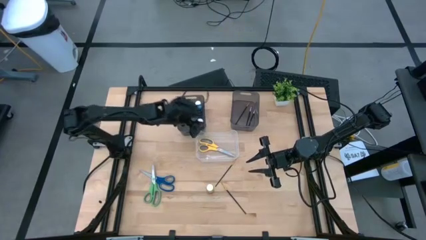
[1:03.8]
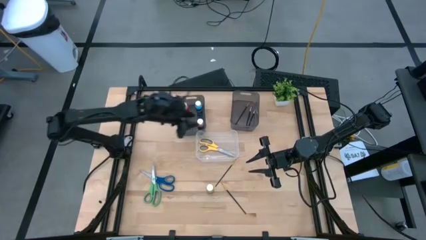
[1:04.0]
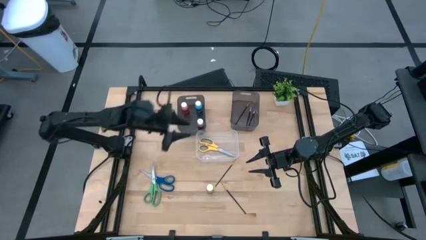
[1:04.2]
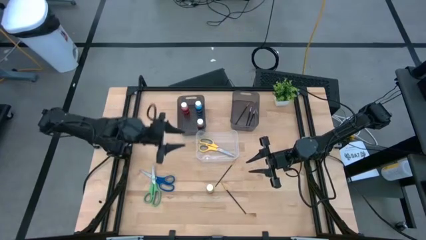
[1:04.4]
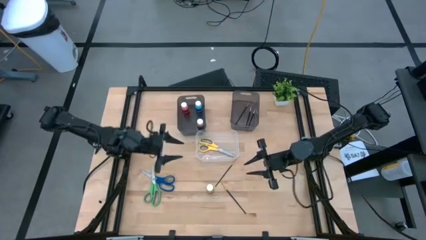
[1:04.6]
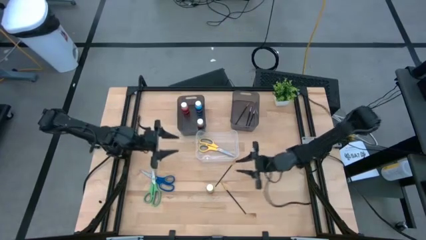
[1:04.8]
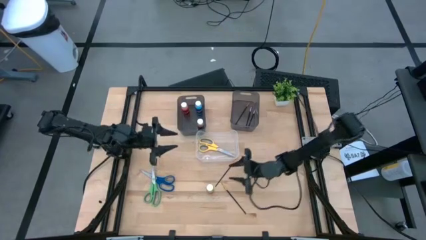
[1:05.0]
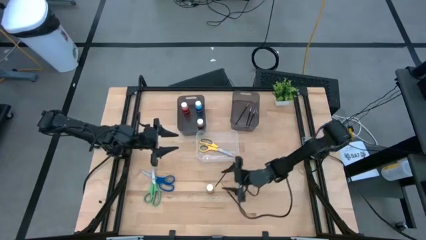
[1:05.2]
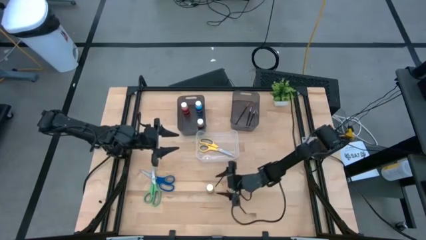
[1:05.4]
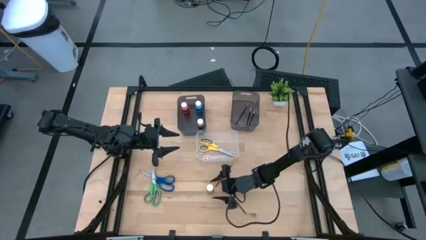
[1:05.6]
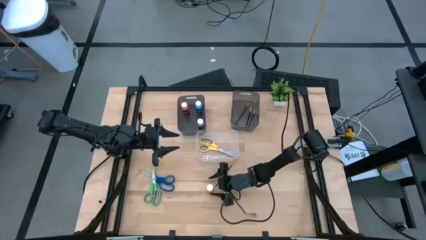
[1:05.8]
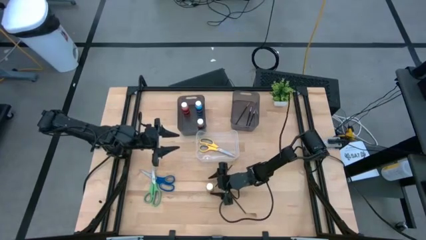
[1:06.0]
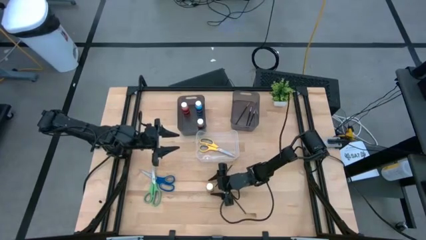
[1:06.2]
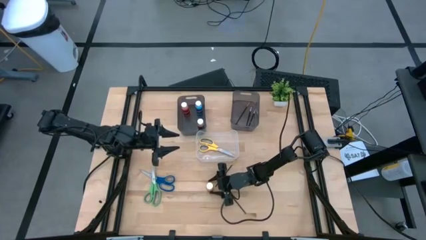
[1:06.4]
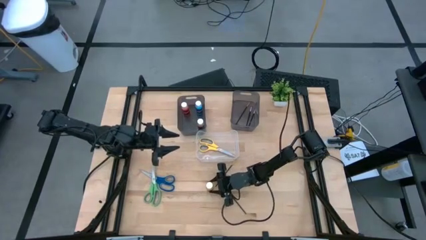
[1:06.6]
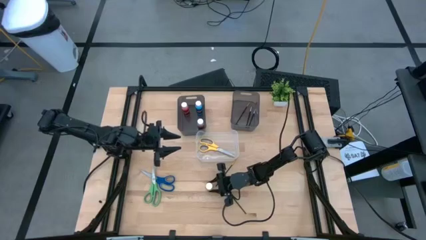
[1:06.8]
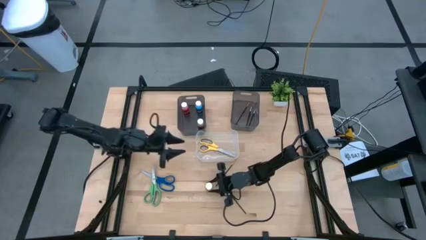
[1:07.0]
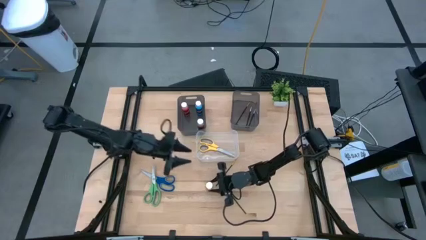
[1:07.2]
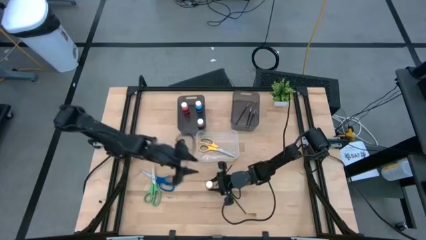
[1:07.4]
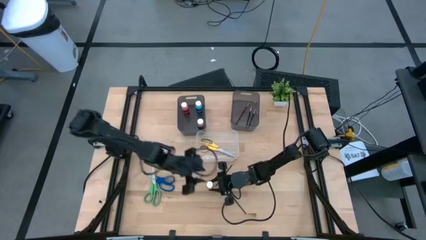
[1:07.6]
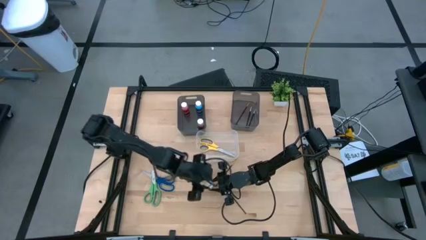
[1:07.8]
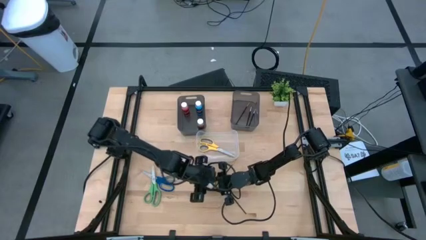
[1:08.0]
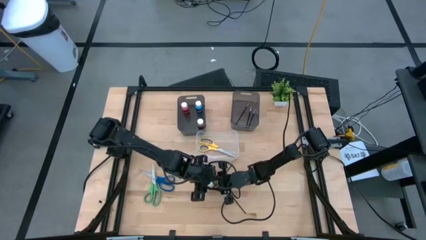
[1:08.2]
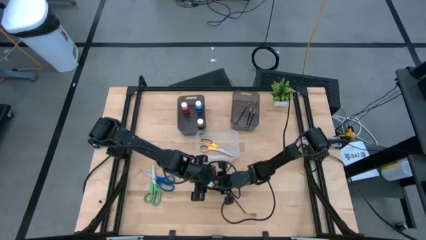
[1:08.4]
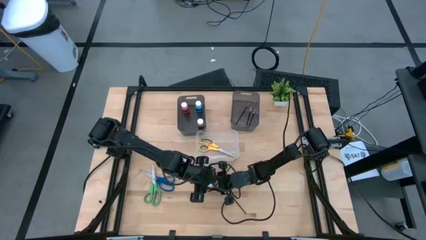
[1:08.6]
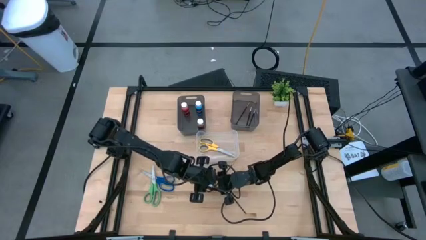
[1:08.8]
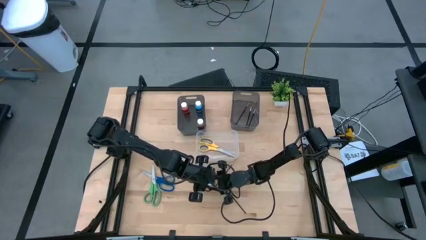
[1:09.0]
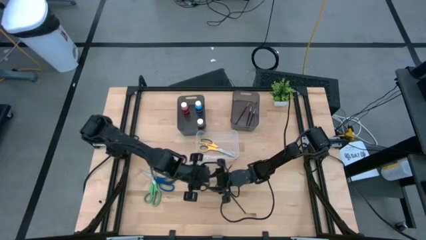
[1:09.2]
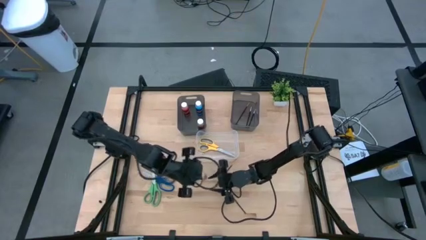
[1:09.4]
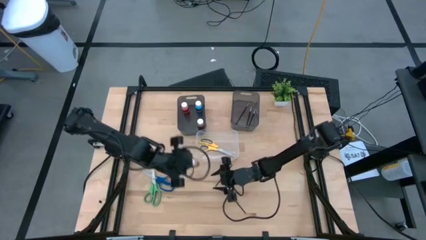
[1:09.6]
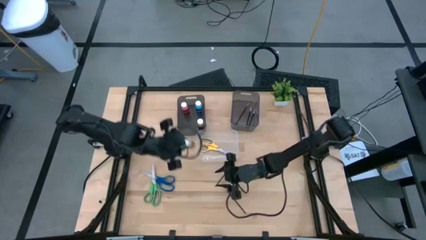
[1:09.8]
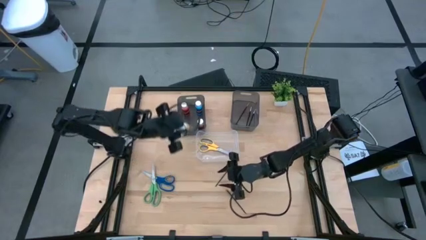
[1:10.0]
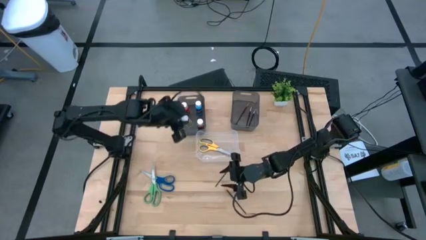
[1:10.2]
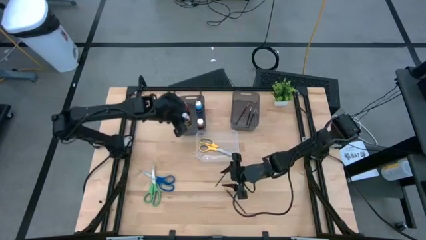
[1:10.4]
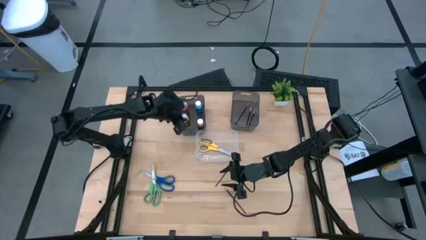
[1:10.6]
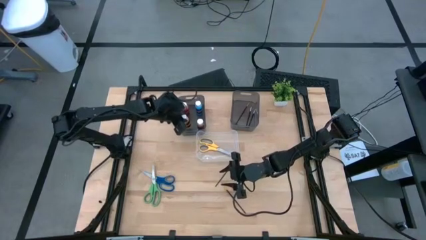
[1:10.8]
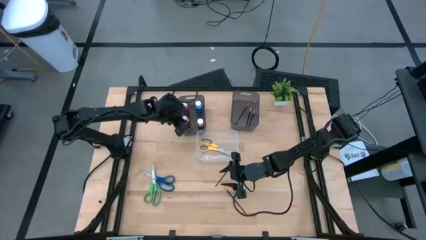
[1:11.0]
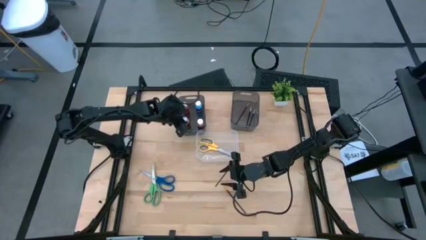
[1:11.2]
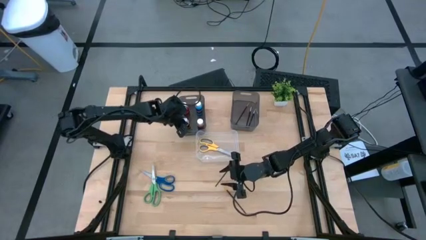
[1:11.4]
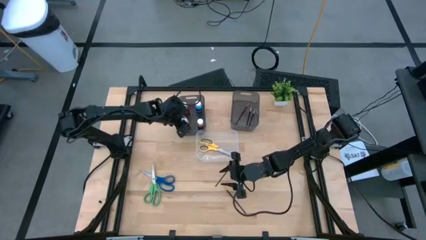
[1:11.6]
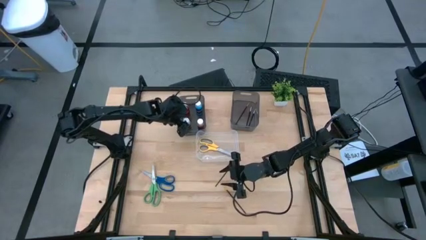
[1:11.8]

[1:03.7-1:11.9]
Task: Pick & Place Paint Supplies
Put the yellow paint bottle into the left black bin

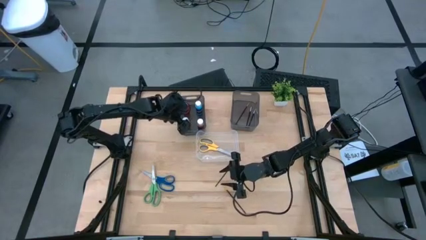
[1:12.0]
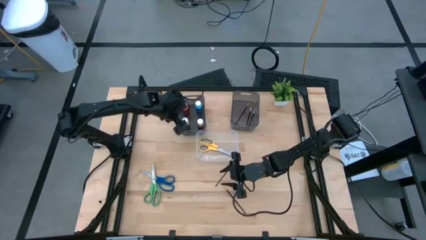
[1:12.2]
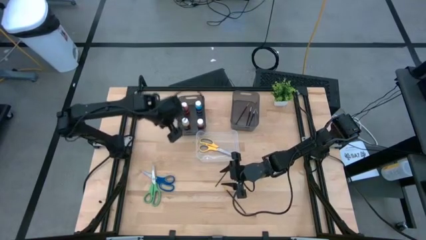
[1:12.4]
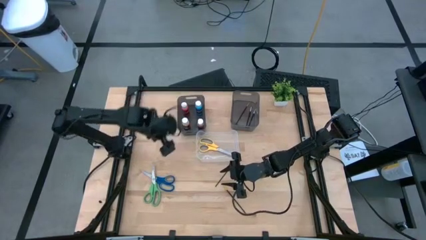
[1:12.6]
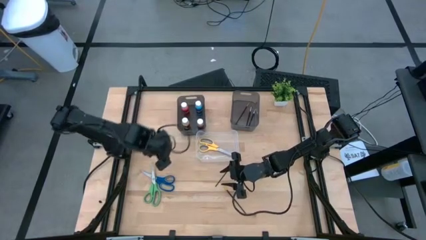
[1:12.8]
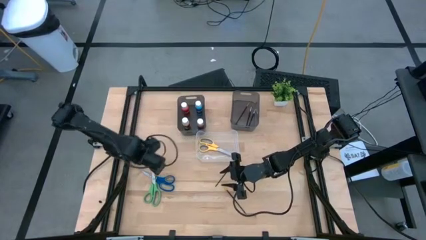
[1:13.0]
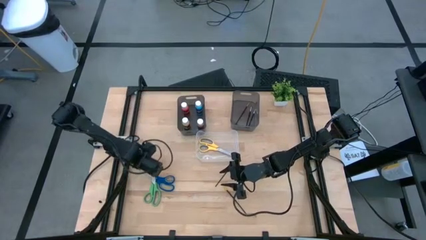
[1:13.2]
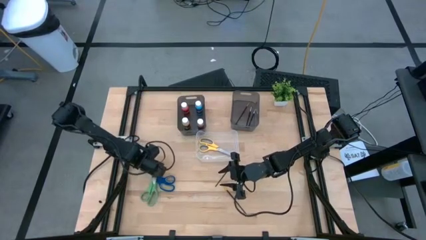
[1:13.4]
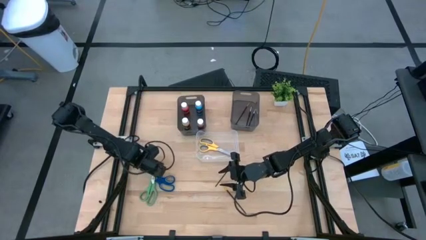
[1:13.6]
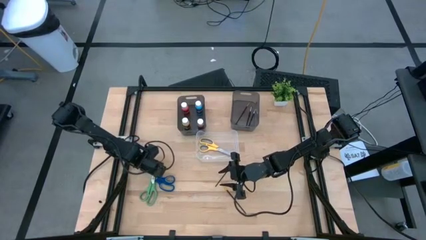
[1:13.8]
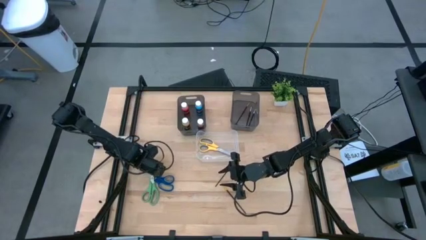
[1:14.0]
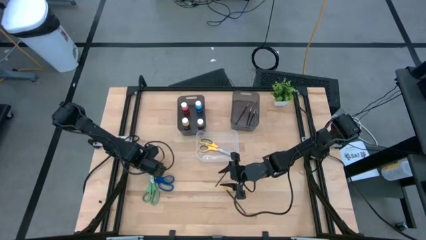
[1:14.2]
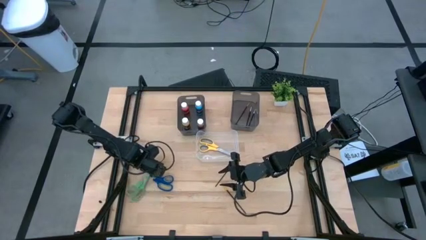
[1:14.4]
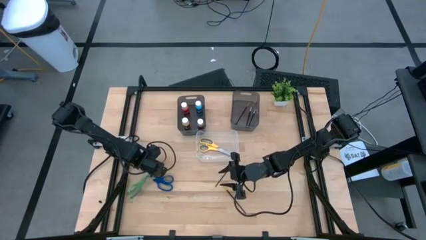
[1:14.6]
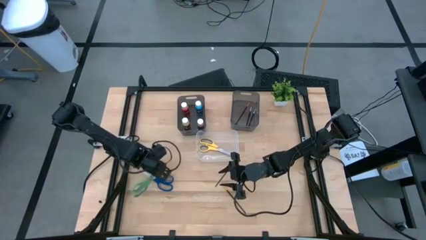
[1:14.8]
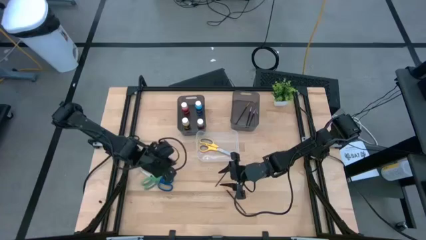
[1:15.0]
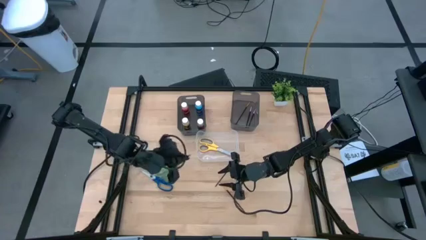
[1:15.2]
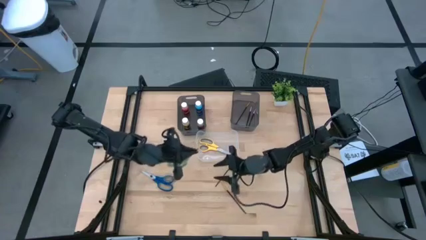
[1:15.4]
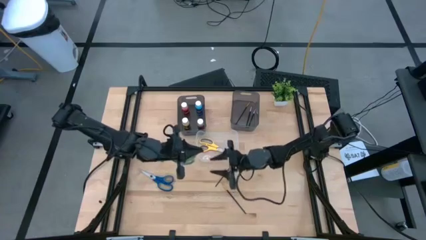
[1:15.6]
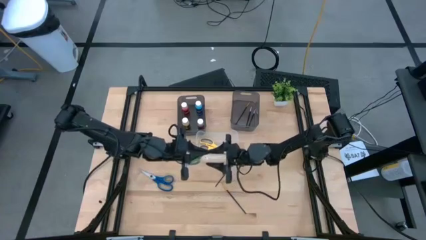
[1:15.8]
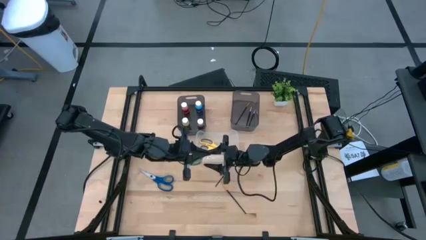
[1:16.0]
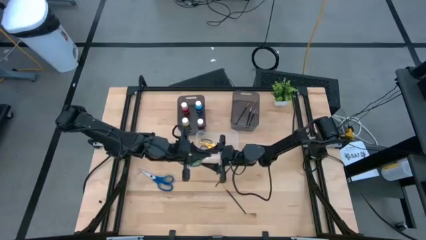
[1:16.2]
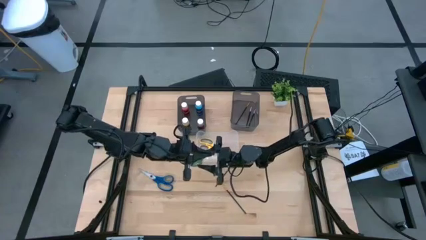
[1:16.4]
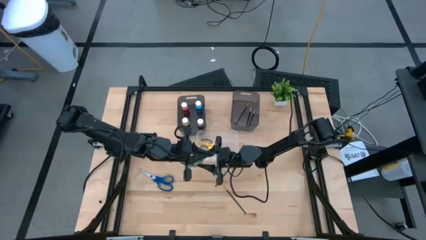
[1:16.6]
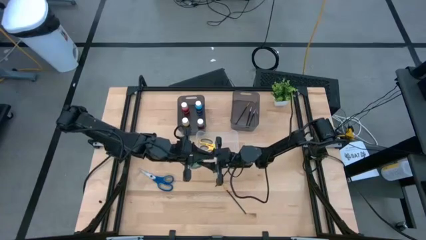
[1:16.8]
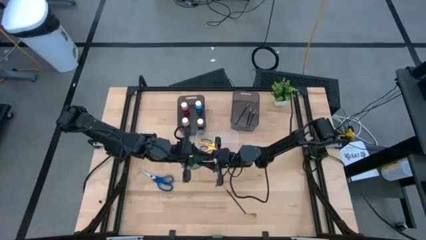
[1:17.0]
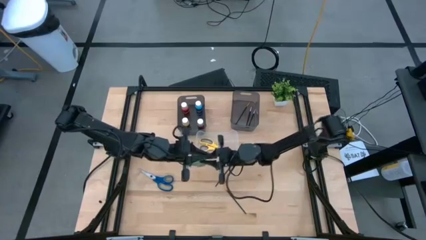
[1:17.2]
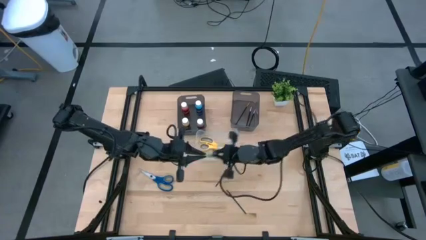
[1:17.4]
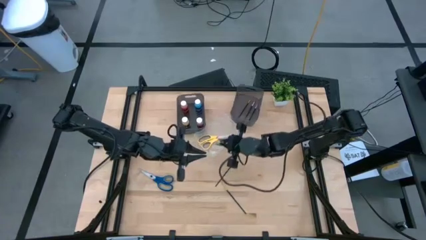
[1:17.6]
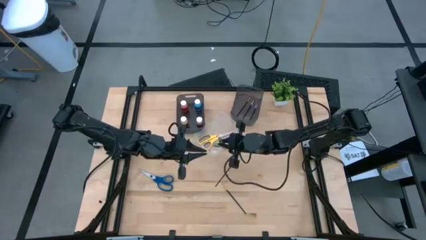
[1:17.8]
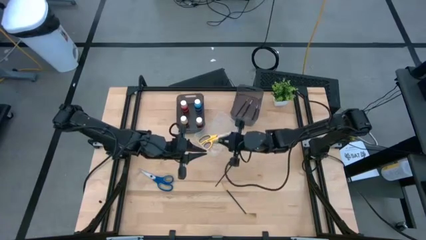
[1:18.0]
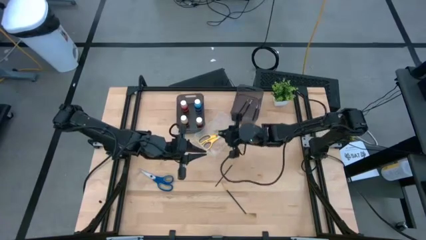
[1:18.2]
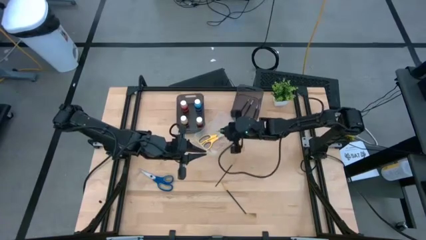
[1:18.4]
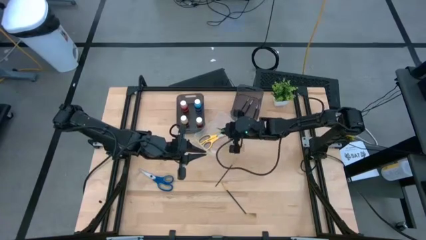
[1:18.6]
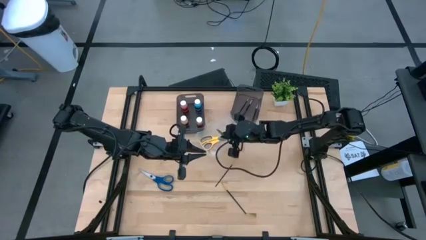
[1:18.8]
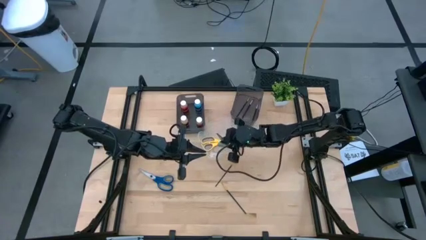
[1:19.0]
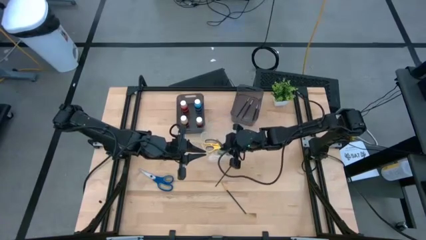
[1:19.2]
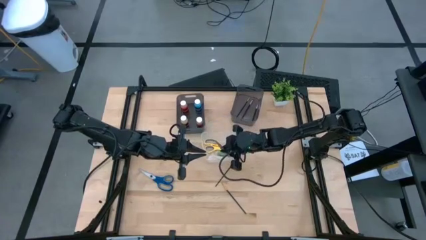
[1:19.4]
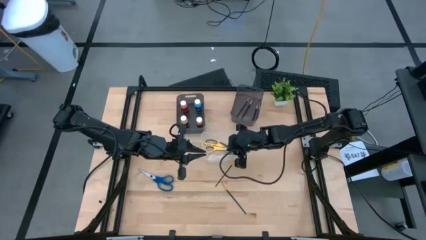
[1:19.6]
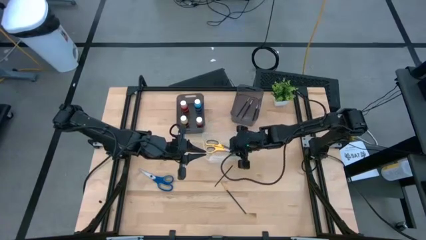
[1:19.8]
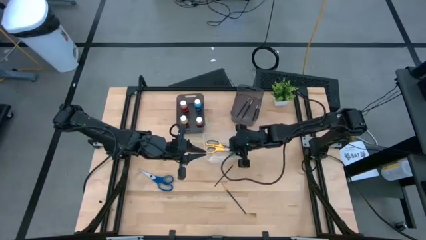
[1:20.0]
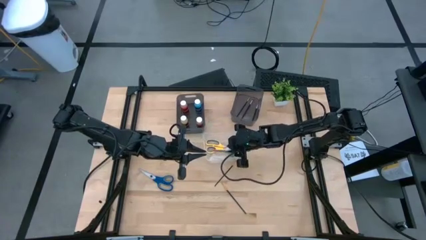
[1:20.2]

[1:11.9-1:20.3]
Put the green scissors into the transparent bin
